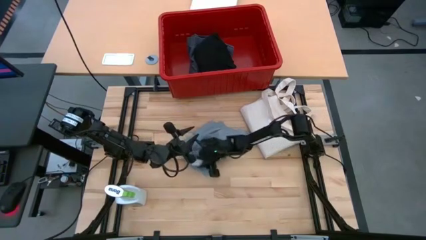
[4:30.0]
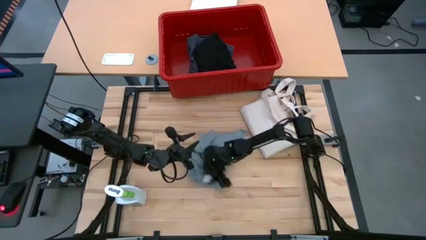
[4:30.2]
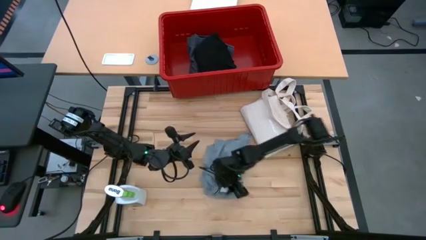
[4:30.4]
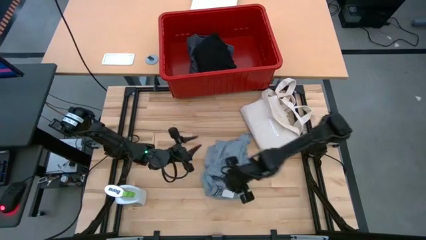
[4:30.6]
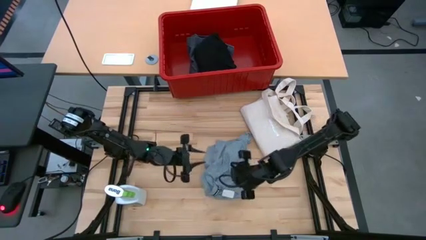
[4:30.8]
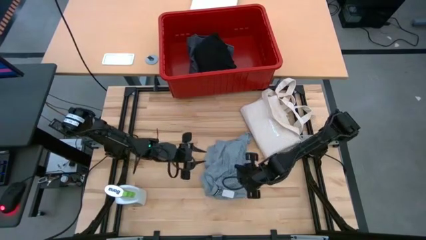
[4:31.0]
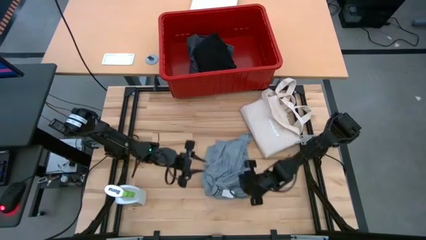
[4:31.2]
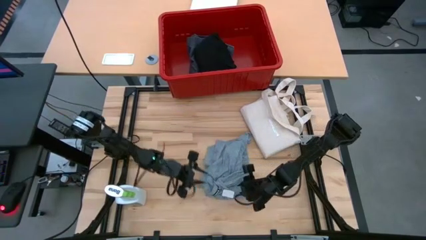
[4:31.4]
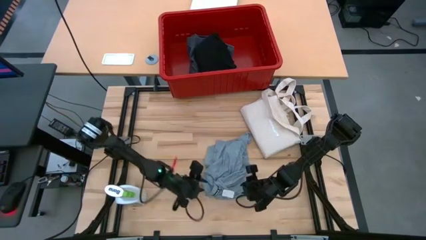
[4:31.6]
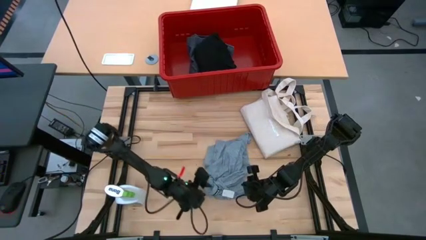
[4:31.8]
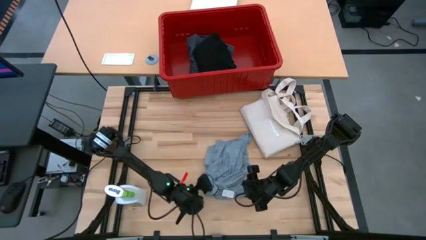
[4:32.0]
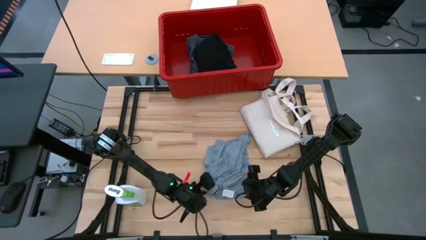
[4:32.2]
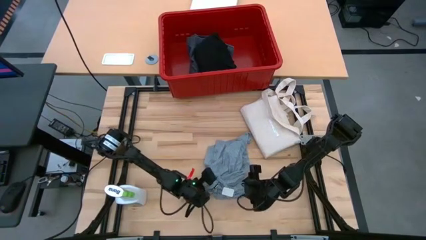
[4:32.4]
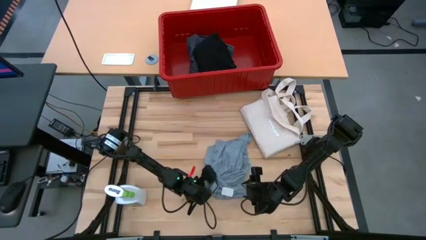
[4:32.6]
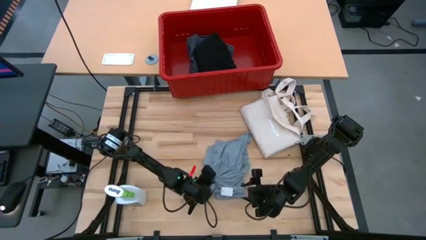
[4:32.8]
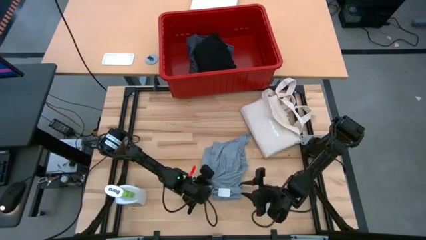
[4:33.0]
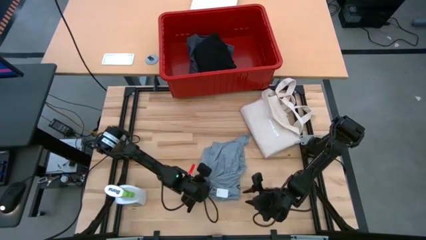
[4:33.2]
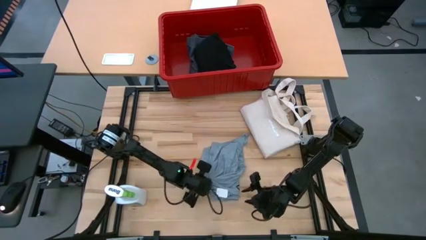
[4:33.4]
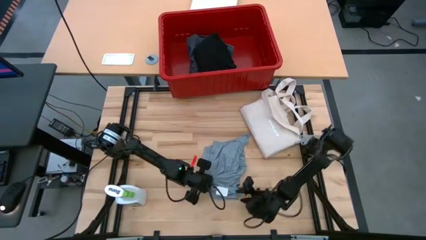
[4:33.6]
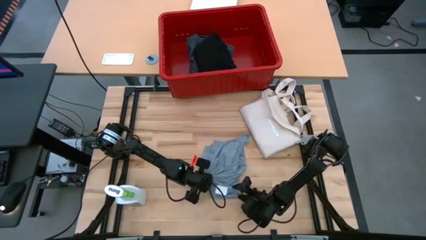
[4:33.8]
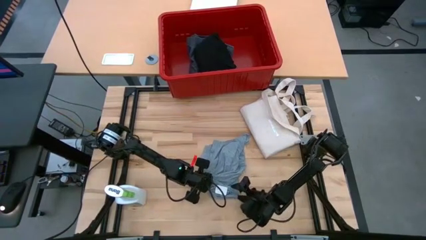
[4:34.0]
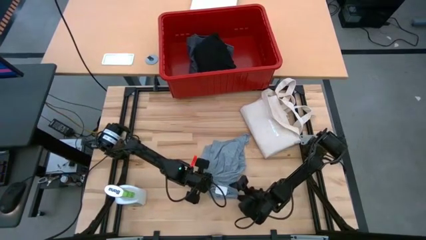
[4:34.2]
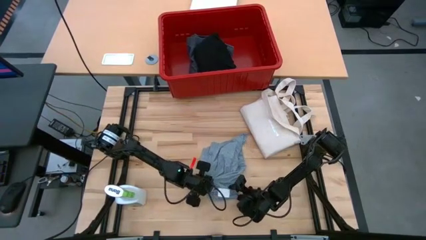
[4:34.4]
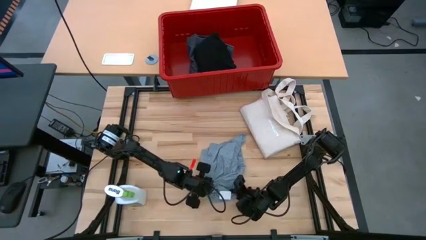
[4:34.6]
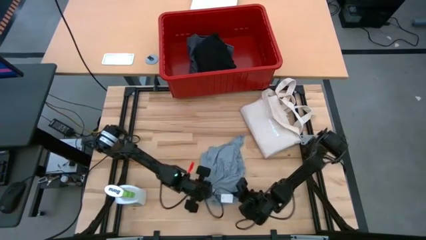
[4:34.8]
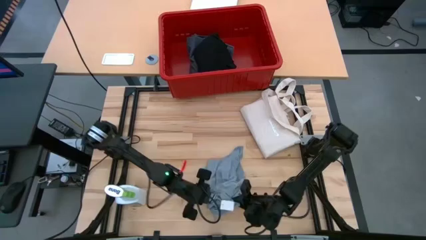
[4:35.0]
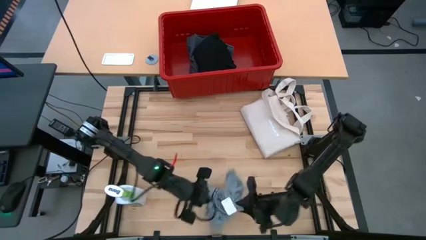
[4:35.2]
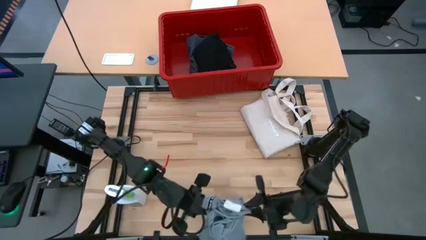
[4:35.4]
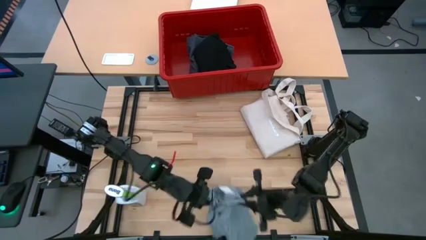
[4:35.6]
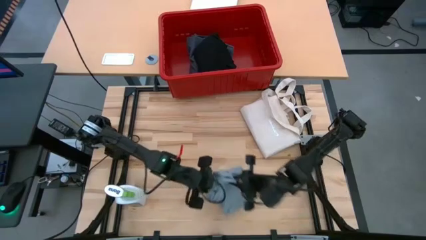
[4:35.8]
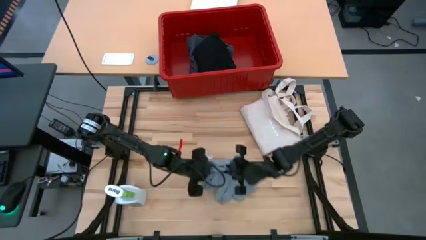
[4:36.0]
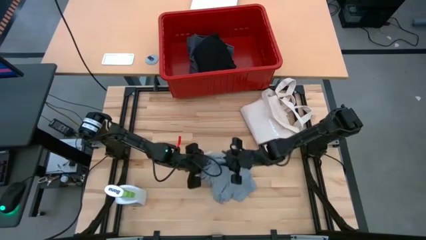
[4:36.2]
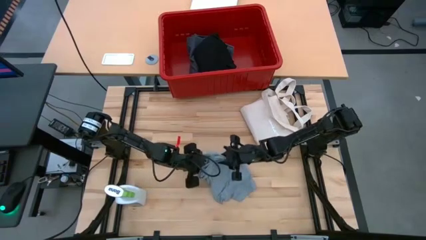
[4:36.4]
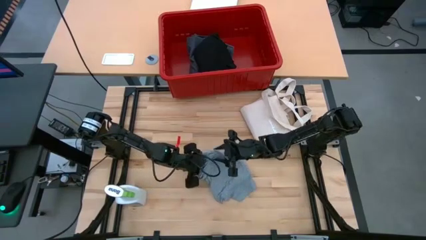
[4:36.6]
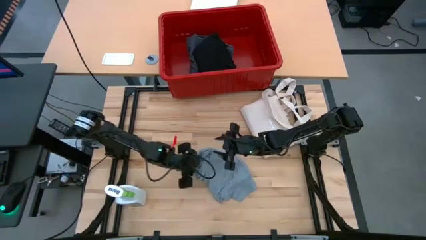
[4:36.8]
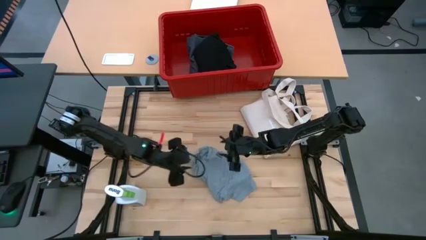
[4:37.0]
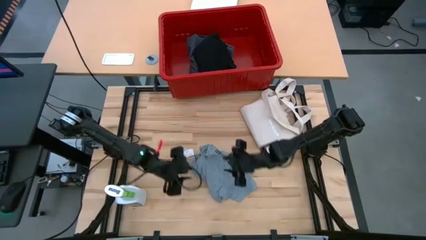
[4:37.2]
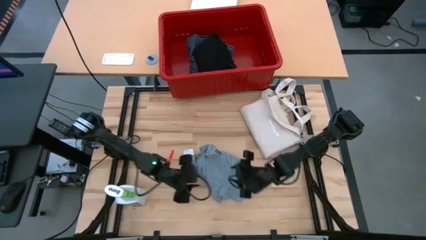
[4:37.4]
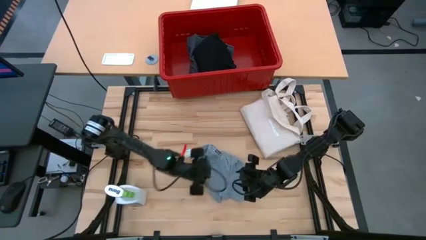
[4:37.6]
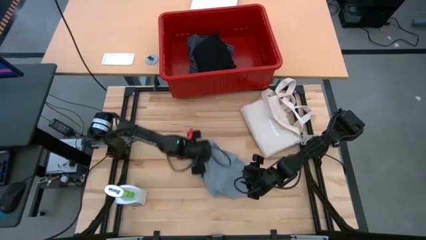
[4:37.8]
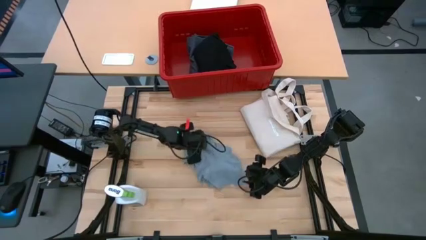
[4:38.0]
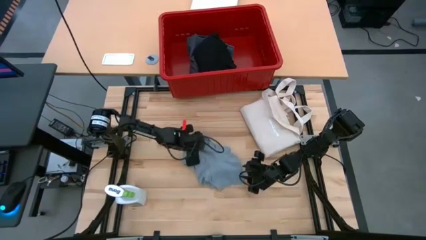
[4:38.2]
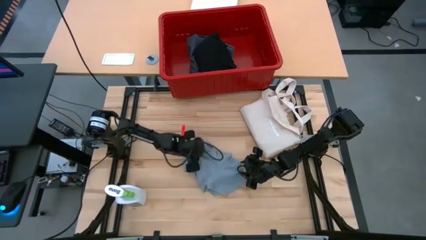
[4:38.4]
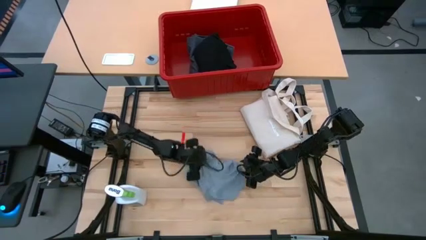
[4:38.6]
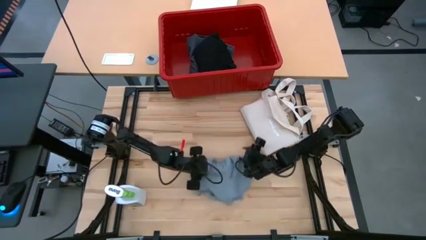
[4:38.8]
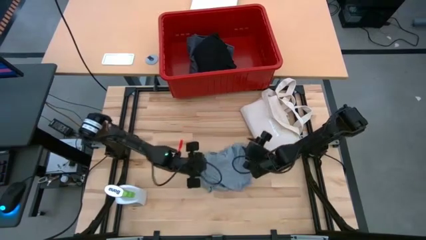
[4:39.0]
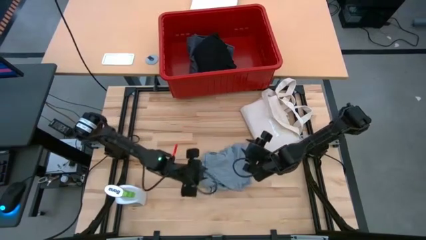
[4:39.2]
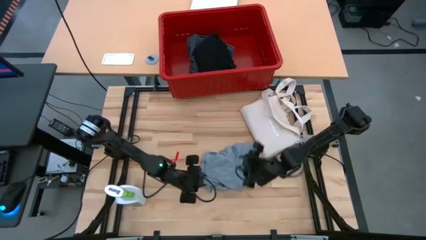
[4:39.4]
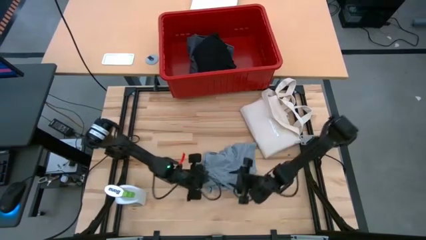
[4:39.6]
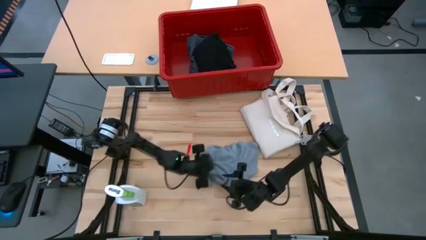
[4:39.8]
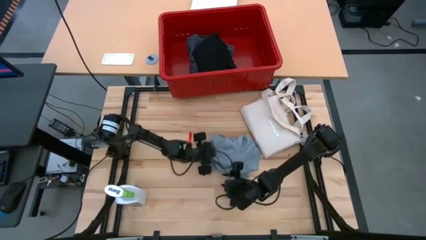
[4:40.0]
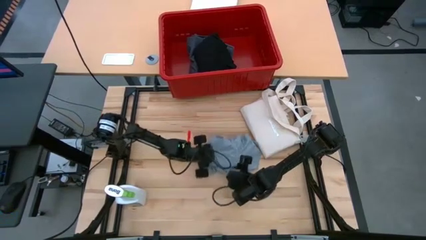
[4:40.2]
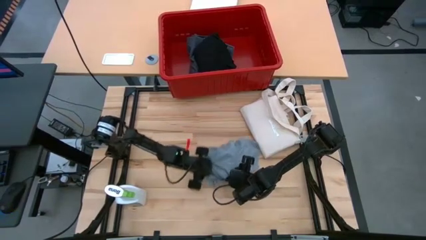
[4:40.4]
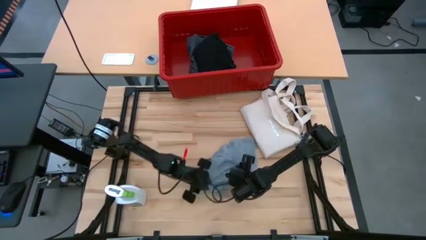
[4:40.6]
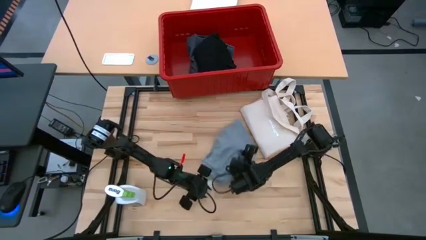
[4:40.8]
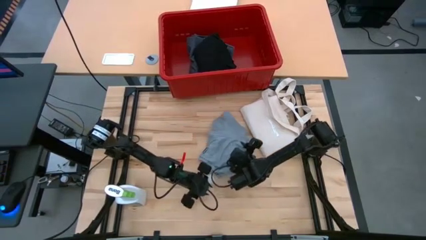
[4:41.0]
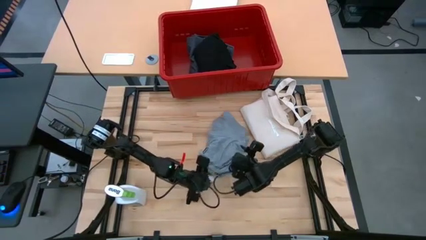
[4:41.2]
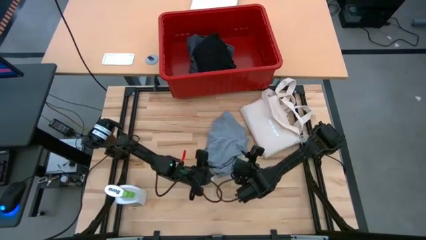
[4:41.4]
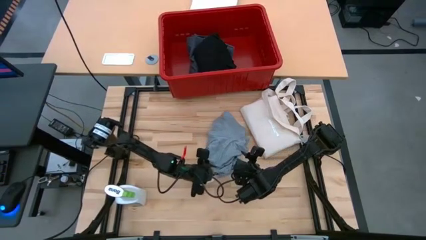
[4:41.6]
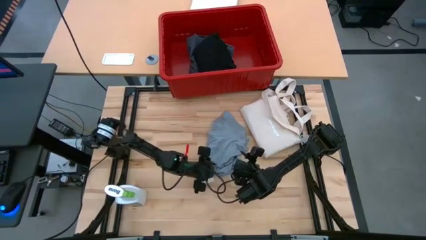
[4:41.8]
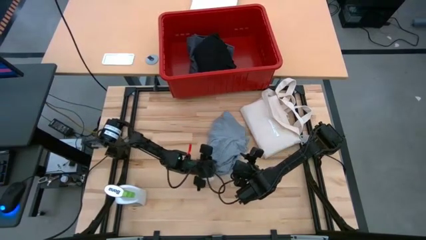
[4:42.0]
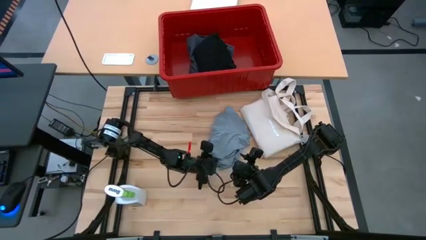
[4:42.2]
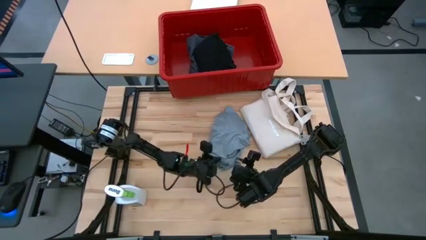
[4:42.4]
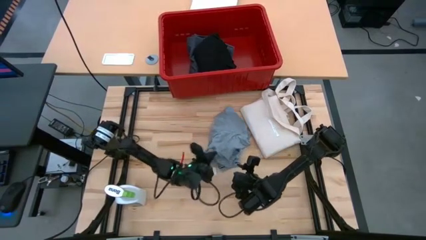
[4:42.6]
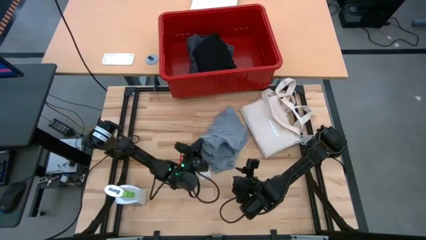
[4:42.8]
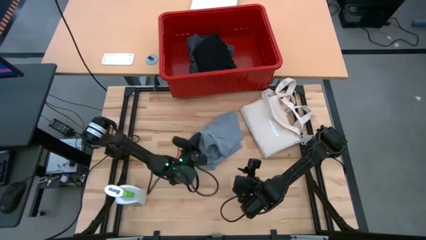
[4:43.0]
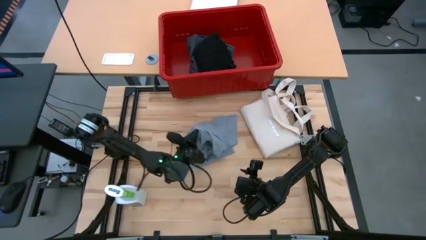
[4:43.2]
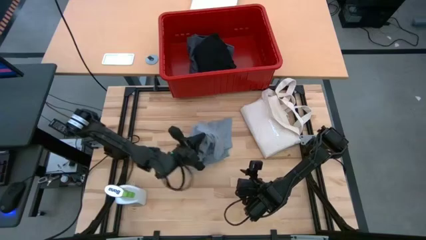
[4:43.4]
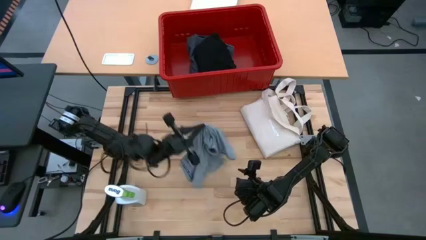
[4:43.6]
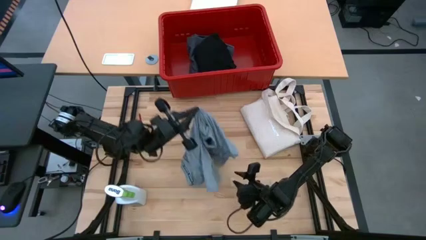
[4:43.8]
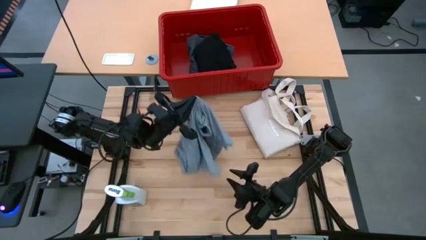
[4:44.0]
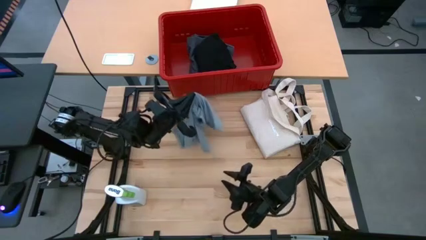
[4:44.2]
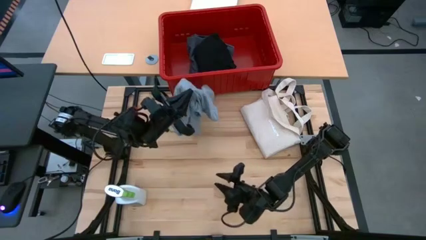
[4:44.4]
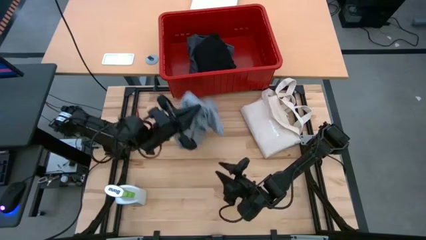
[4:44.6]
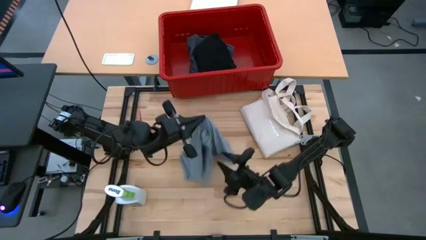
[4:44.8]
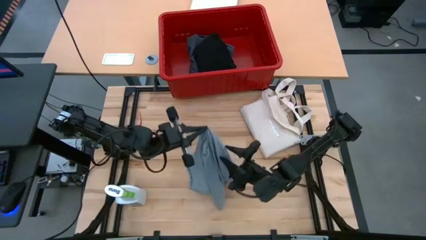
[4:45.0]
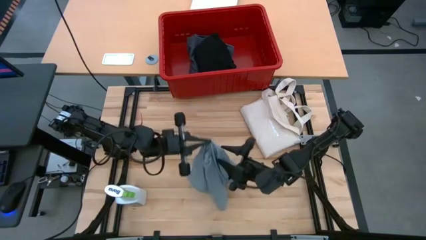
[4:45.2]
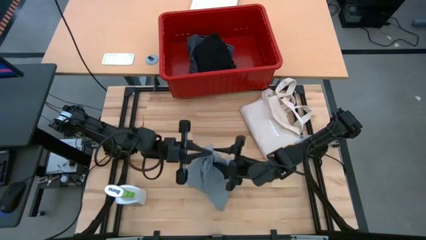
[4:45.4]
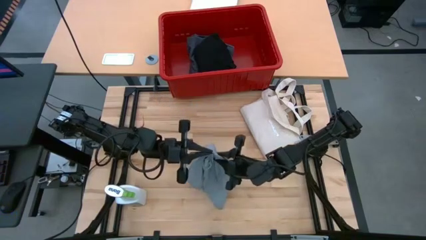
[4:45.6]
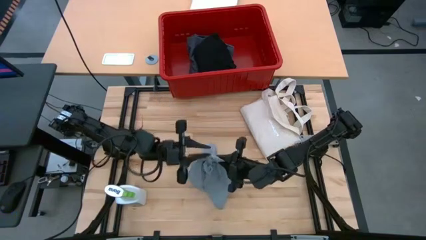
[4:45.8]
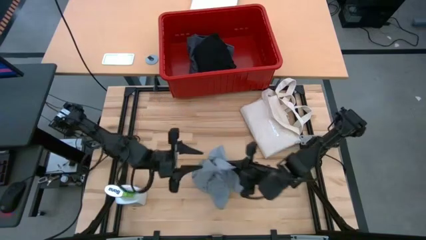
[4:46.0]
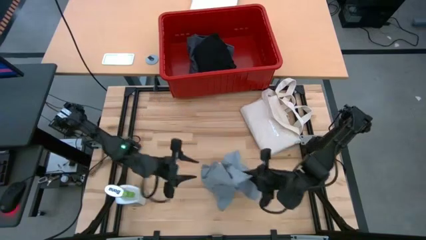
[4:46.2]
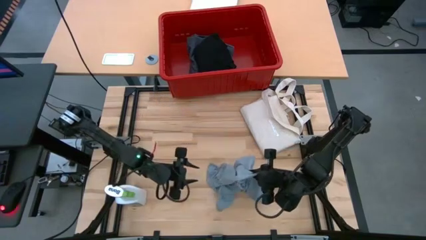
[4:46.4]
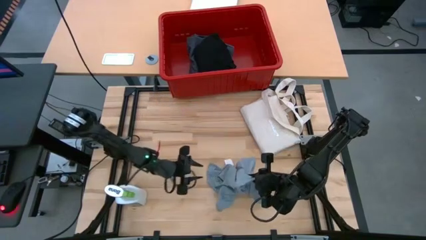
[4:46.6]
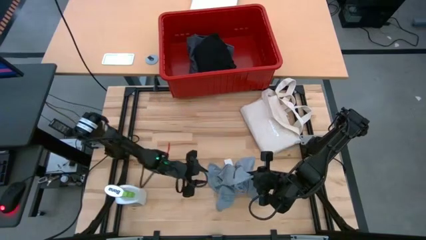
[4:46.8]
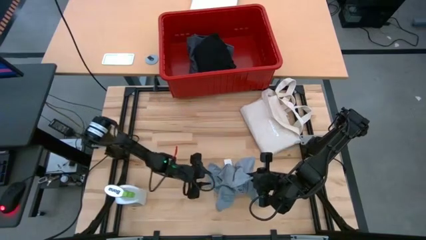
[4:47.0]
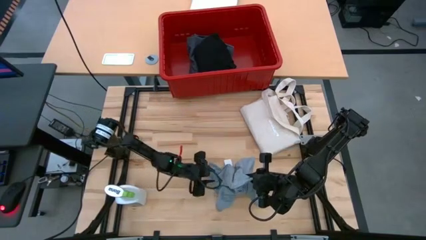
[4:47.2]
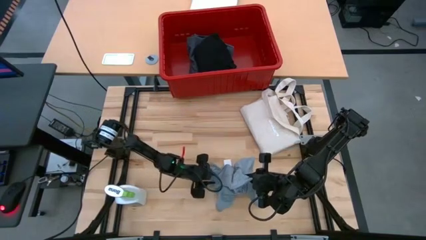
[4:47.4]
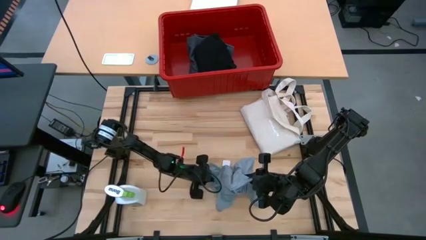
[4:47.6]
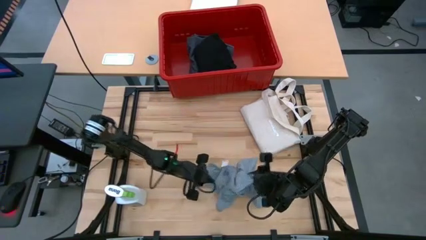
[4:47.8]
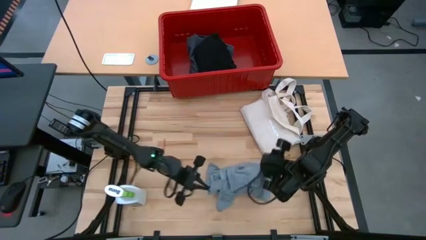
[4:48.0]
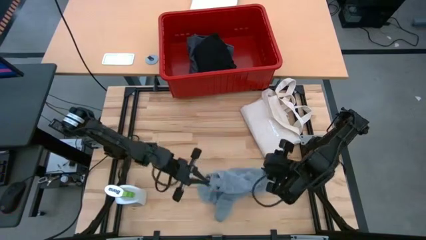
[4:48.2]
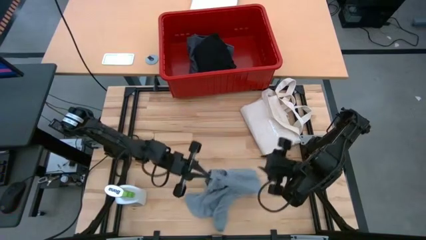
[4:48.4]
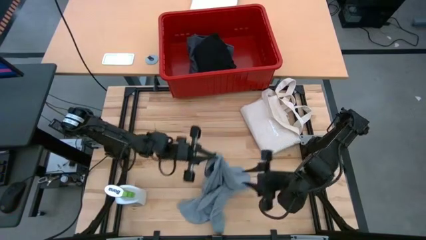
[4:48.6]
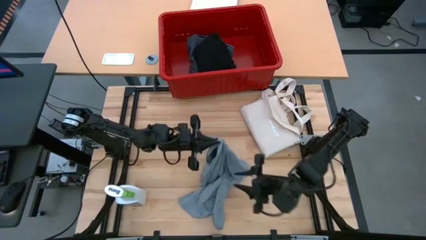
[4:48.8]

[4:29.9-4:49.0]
Task: Fold Laundry from Bin
Fold the gray shirt
